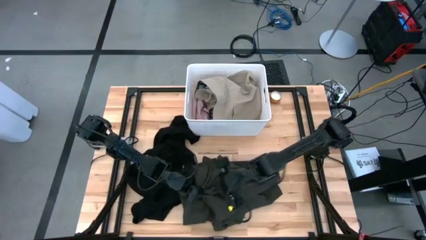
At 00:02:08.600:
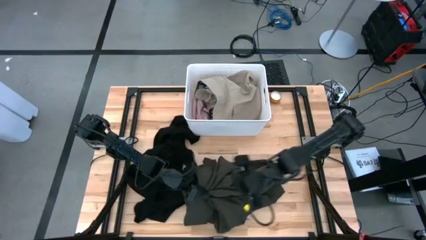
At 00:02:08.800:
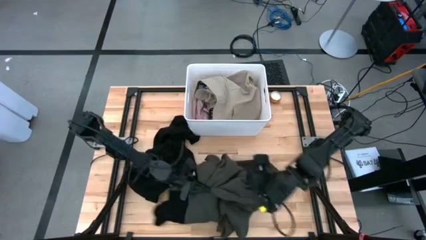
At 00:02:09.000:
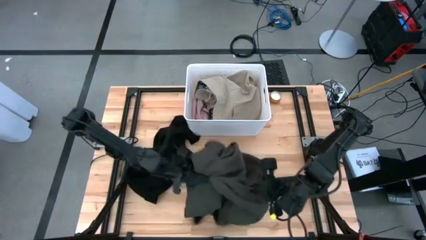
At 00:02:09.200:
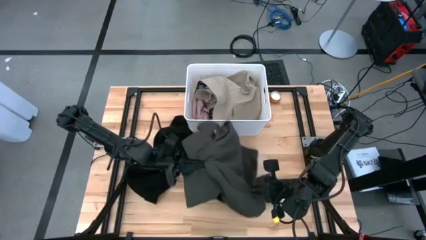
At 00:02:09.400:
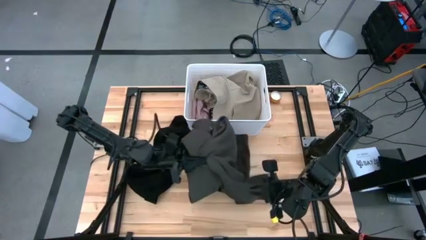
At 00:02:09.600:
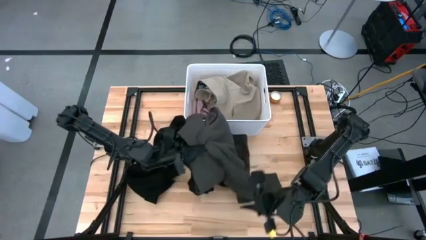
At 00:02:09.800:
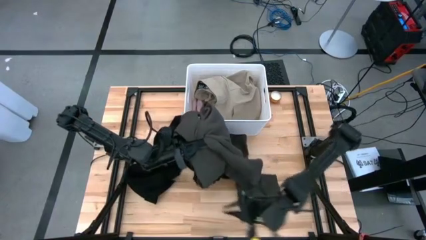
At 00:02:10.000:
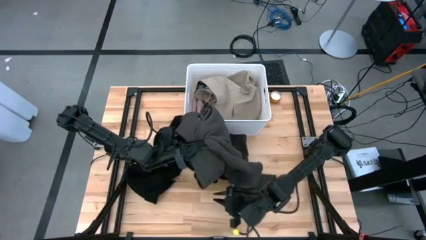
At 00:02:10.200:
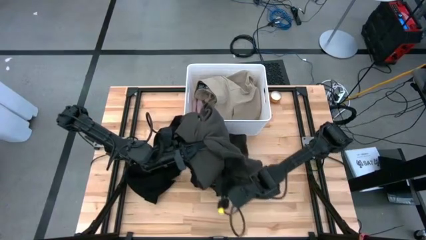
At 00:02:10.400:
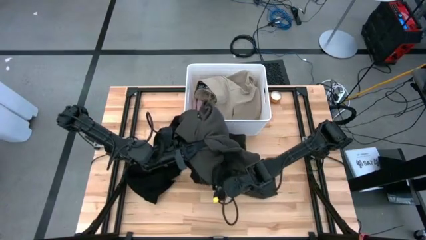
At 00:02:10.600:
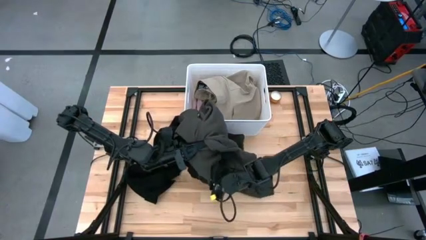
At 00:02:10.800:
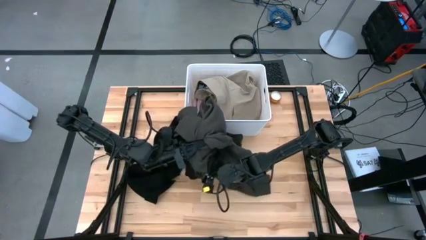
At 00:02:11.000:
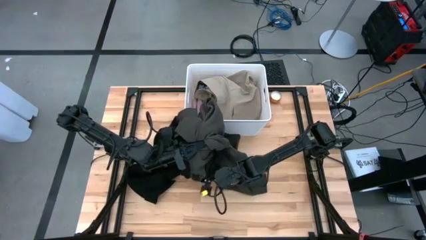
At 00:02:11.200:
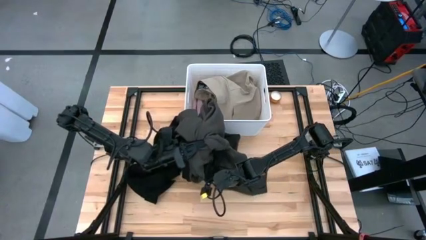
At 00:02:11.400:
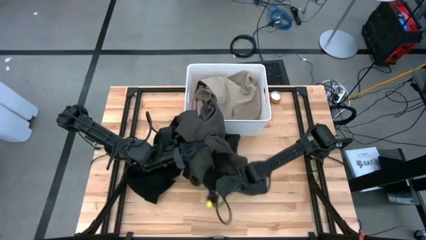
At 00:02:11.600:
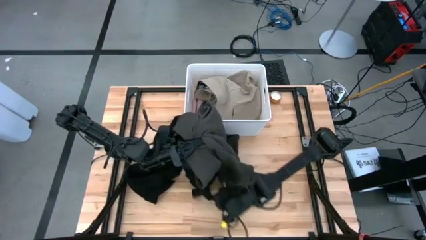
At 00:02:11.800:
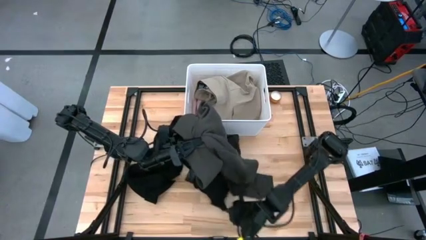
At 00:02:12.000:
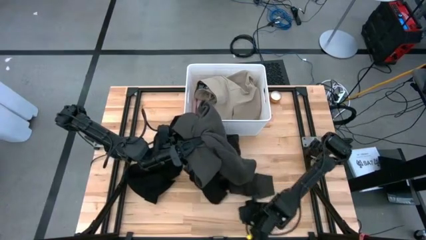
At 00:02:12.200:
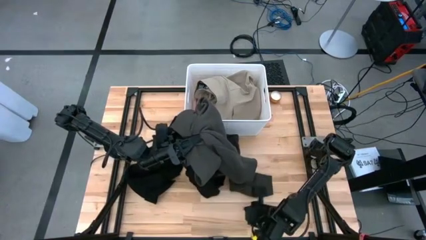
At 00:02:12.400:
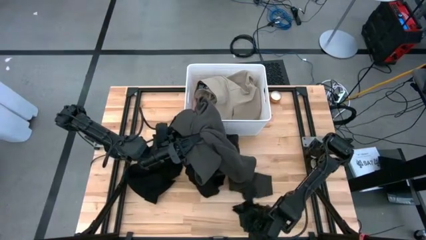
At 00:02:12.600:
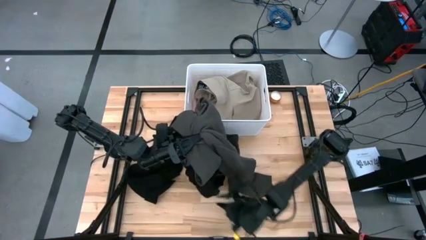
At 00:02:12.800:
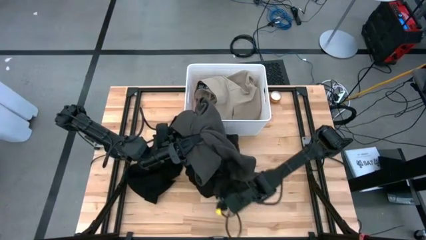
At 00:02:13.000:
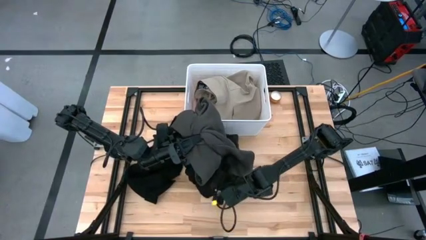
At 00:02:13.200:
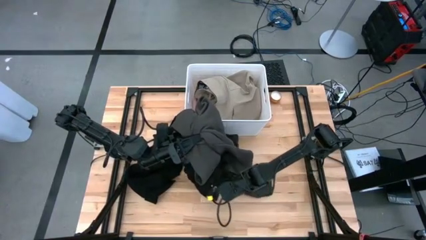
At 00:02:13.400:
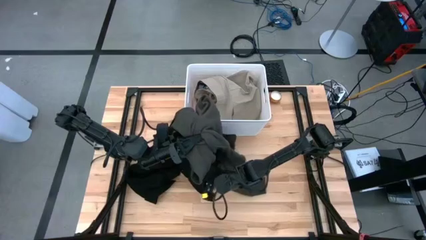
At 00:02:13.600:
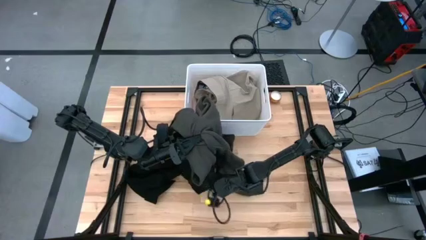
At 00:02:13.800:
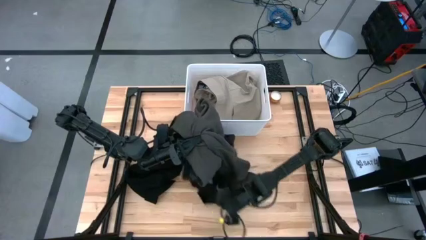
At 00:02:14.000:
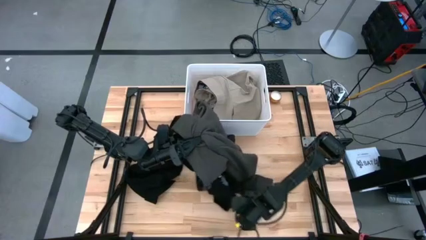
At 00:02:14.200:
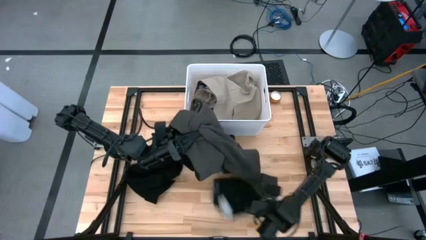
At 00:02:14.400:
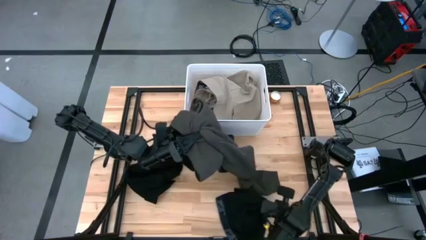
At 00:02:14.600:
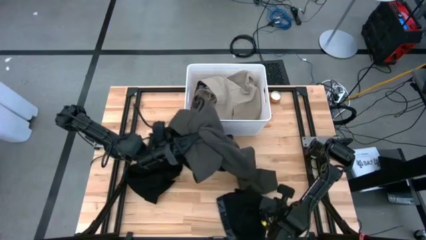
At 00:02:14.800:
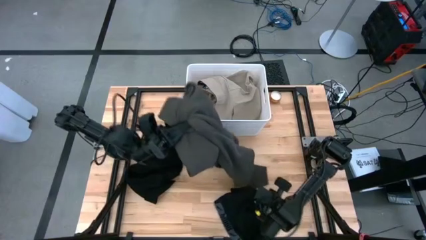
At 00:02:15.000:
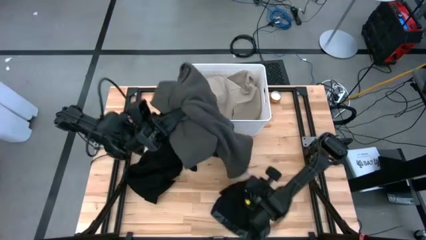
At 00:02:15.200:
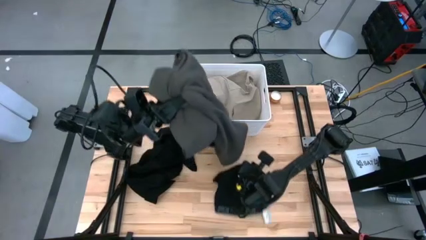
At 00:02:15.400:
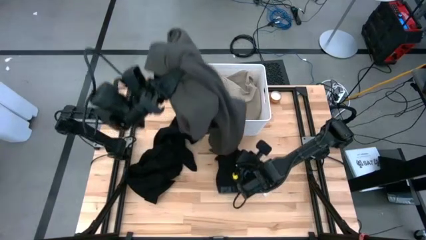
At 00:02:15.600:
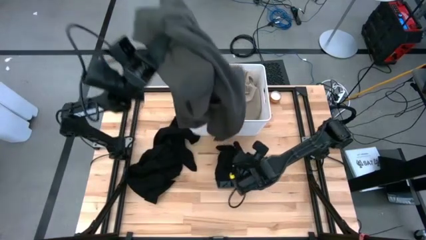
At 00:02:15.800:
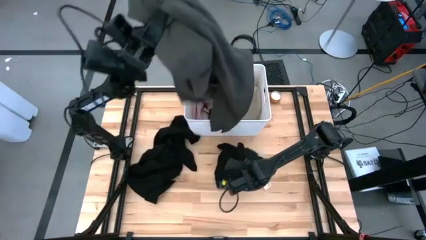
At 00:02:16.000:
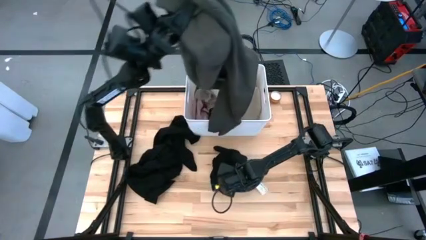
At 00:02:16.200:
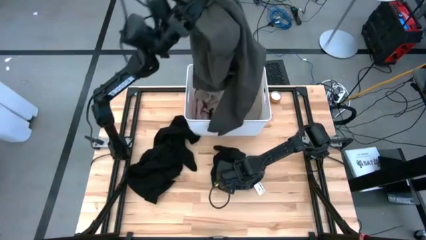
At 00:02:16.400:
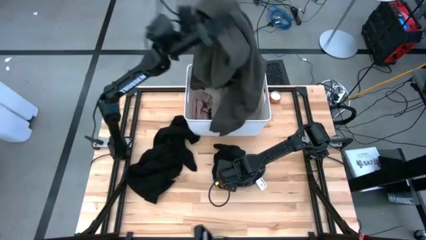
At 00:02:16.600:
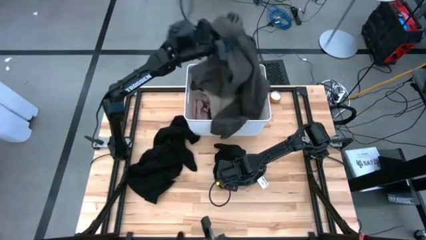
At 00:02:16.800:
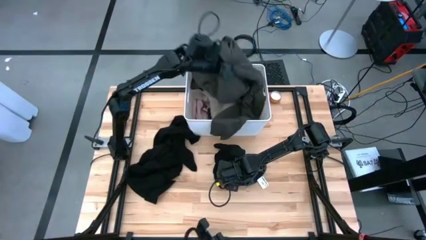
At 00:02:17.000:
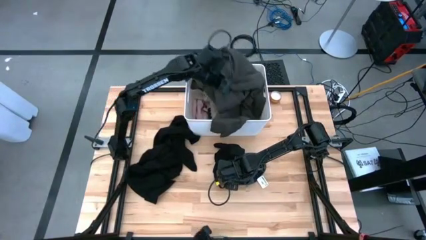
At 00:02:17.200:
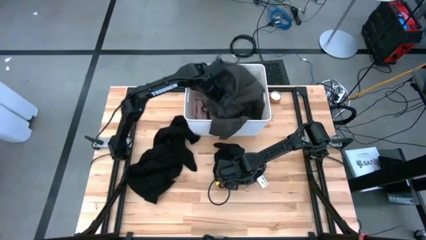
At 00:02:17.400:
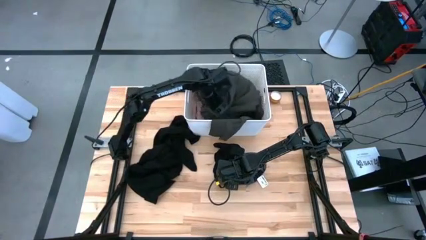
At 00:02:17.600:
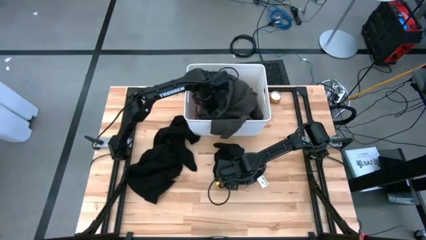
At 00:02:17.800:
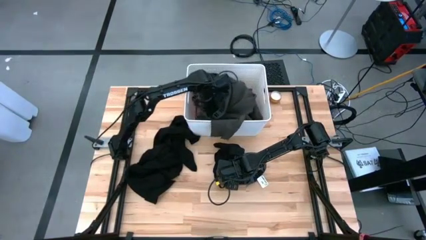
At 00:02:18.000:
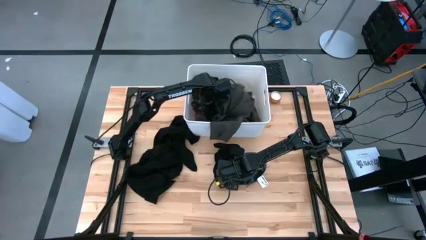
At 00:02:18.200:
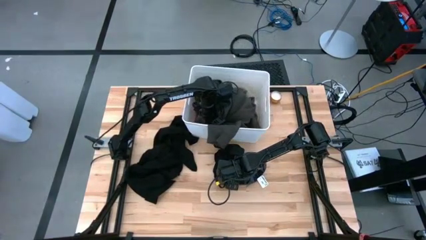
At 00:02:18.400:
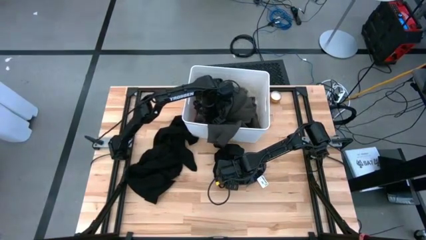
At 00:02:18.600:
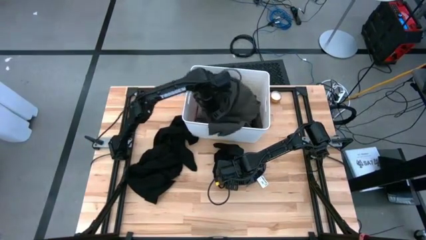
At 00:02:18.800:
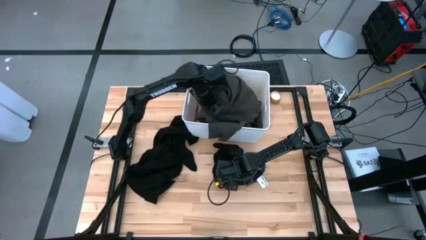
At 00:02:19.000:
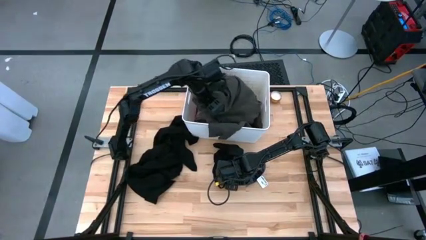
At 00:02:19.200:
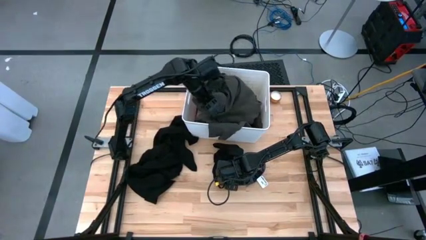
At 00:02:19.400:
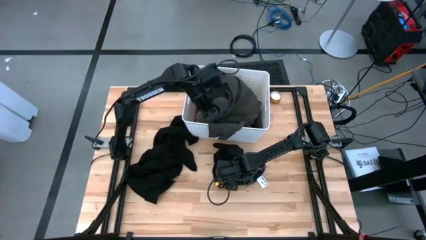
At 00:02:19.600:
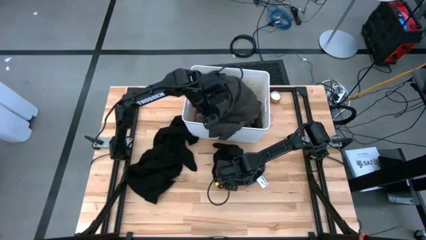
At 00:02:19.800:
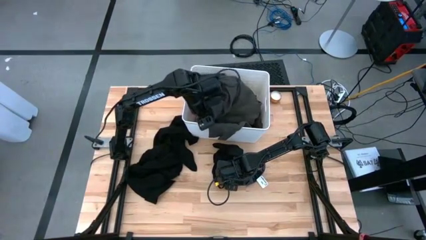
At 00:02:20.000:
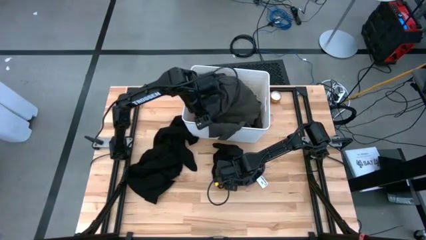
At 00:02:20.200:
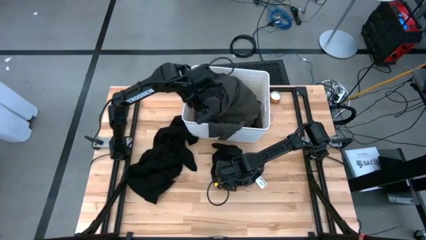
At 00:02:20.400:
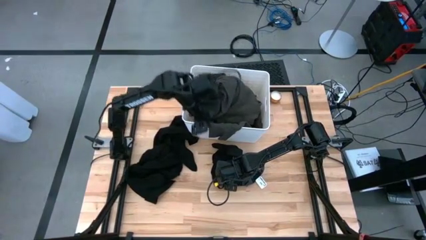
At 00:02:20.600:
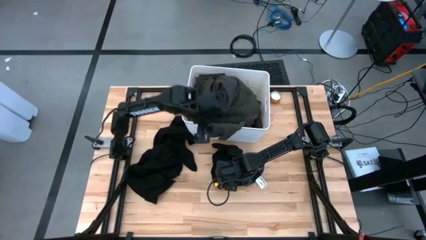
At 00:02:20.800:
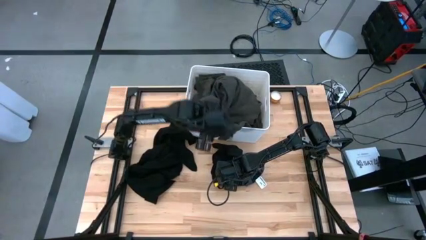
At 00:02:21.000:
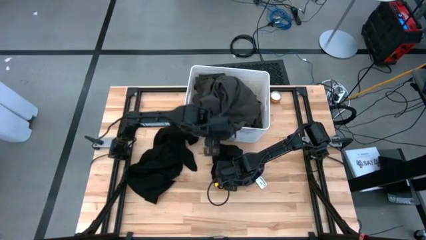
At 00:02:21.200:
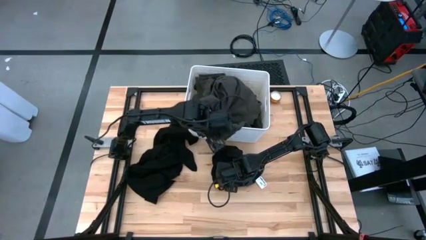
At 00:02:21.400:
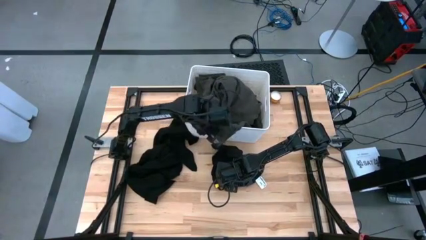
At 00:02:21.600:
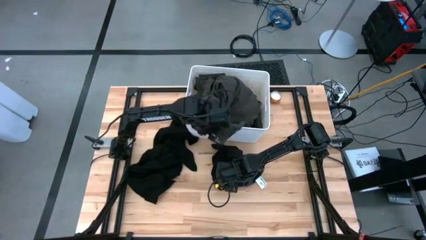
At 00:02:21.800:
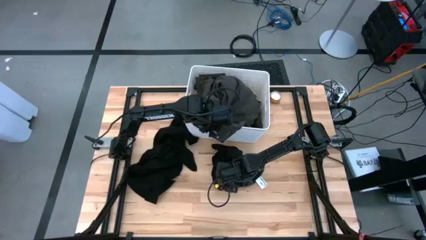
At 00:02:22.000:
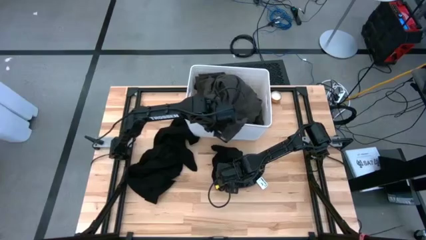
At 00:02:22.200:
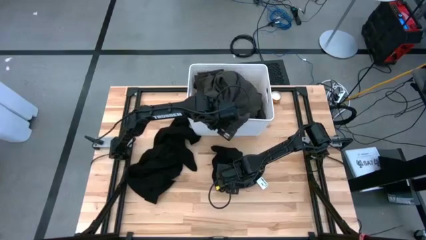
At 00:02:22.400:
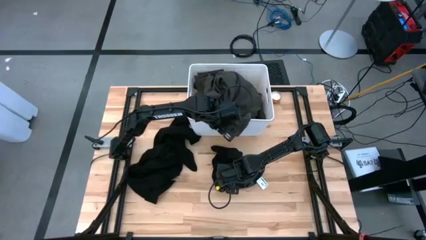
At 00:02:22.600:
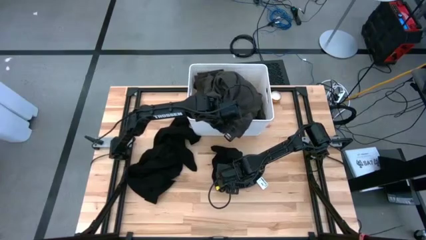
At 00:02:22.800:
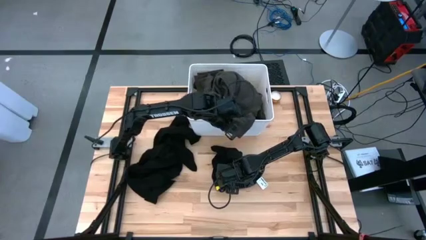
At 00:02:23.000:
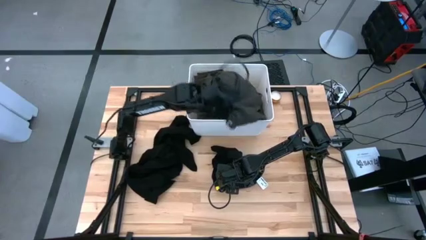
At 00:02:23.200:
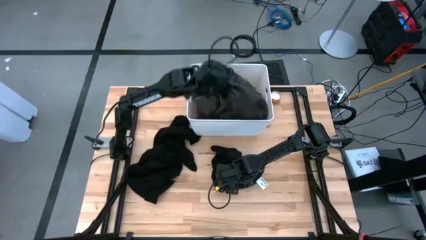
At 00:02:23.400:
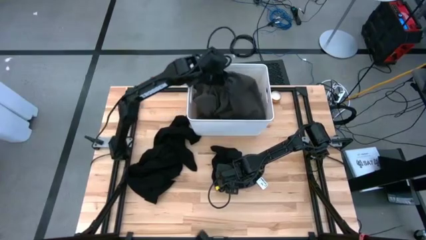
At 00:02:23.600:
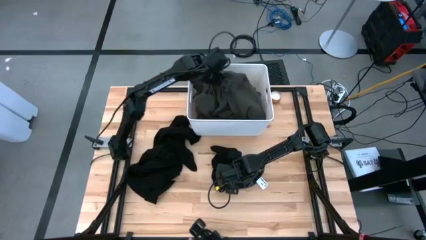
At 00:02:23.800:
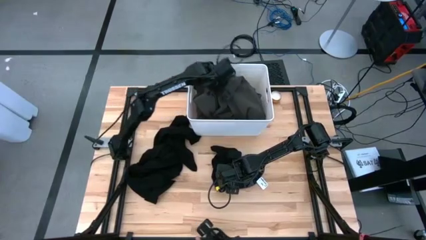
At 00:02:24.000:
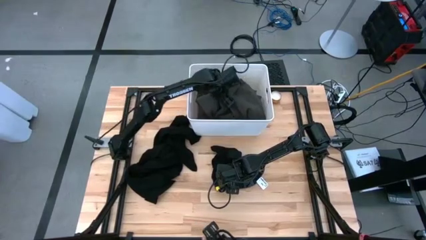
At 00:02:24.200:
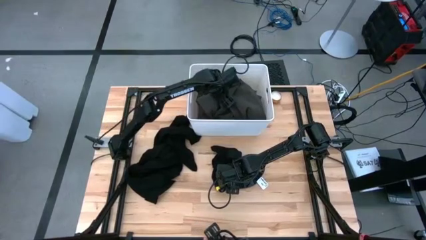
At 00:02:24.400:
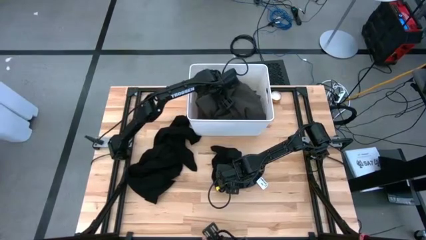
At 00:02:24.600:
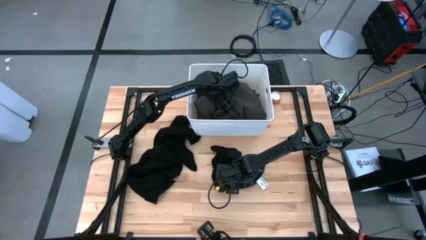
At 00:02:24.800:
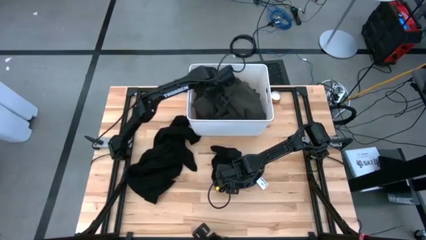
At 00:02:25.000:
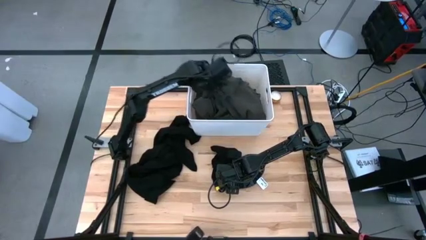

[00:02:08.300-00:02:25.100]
Task: Sort clothes
Put the gray hoodie into the white bin
